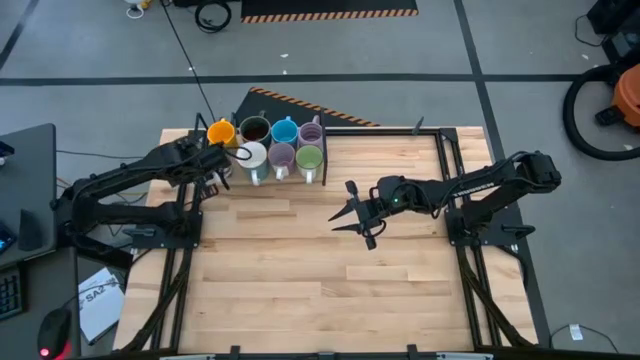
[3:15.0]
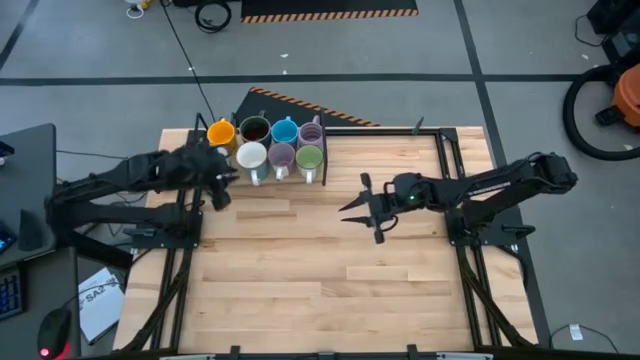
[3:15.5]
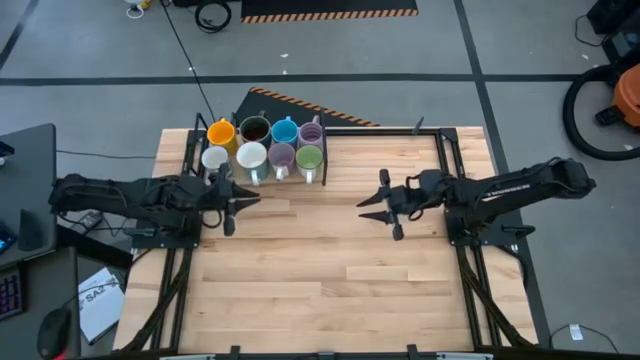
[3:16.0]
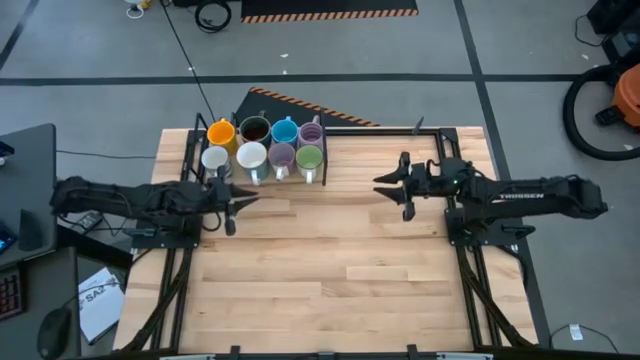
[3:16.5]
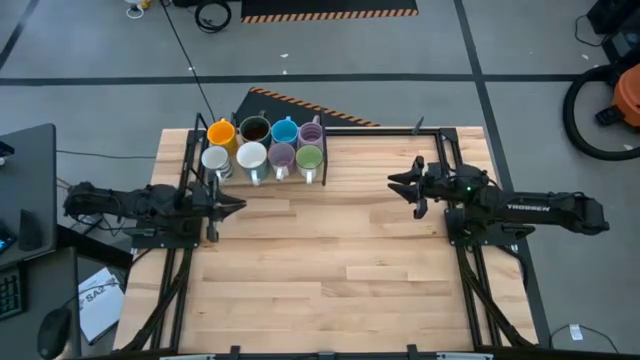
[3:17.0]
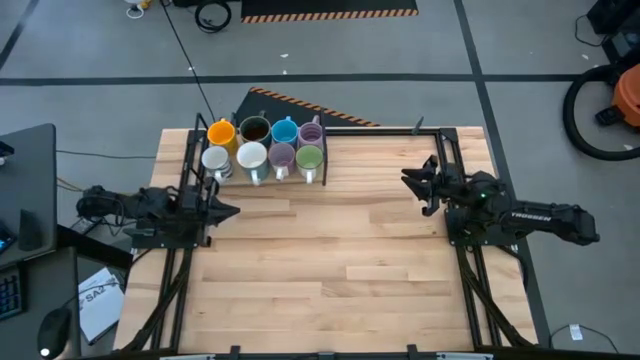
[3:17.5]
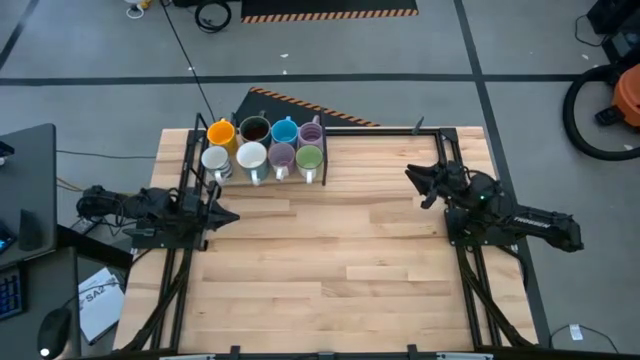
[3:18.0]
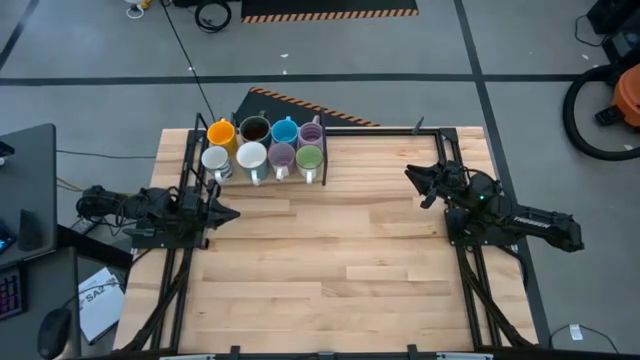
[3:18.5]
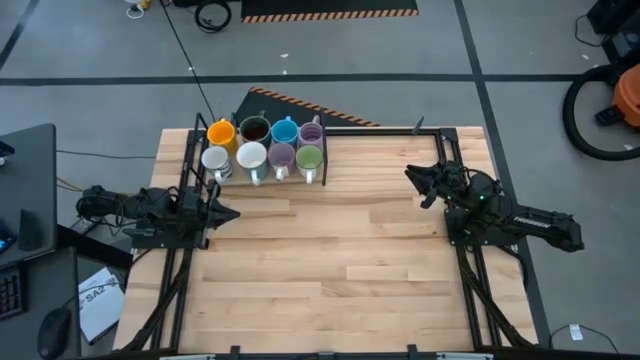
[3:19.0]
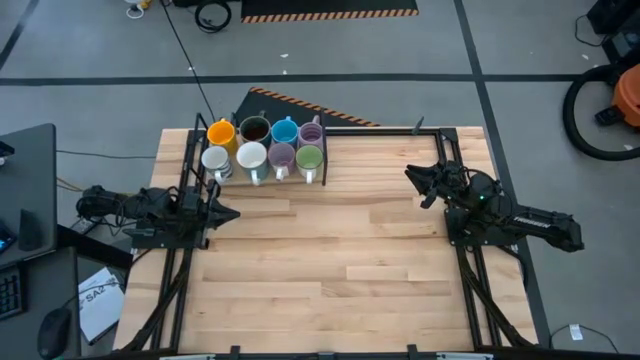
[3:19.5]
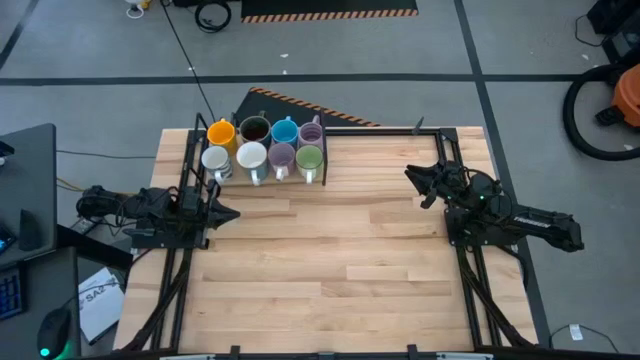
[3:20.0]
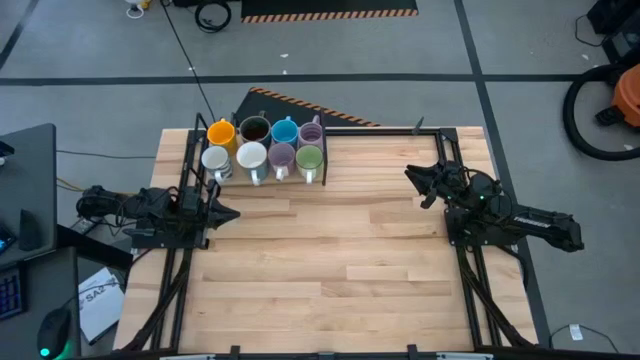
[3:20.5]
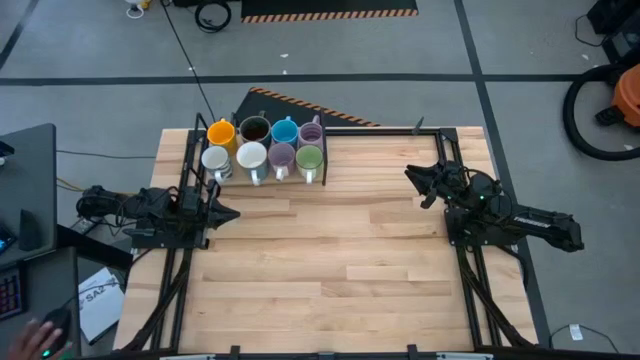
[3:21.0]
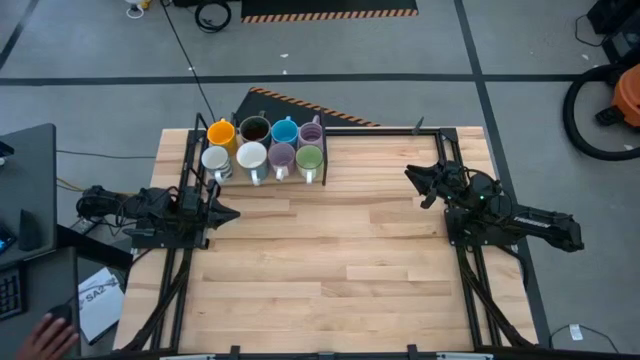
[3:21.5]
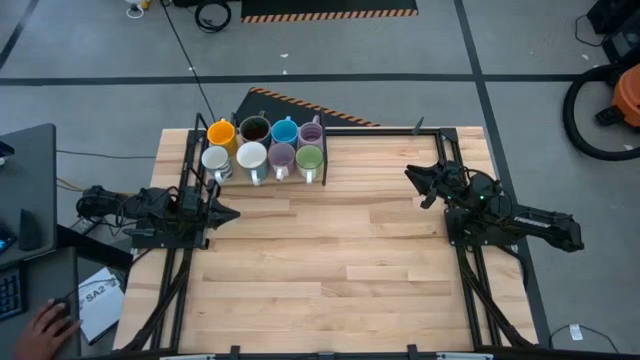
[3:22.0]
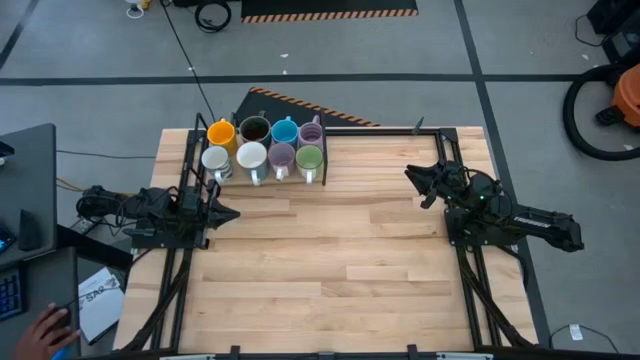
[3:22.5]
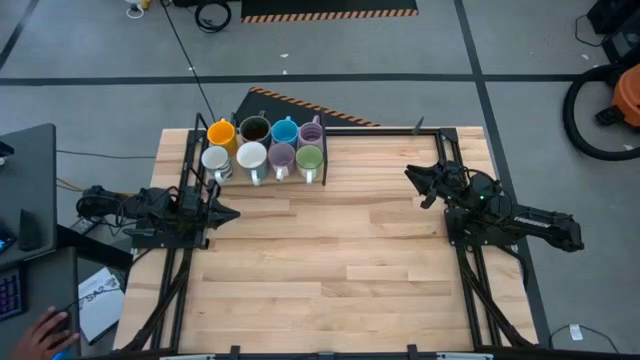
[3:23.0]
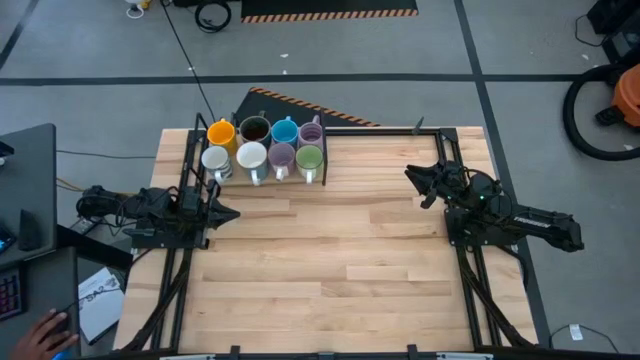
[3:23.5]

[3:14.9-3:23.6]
Task: Place coffee mugs
Return to Home Position

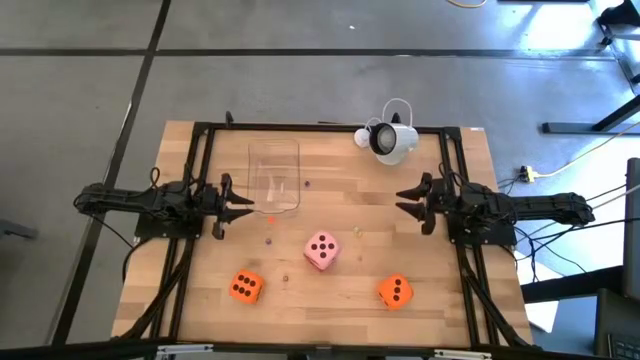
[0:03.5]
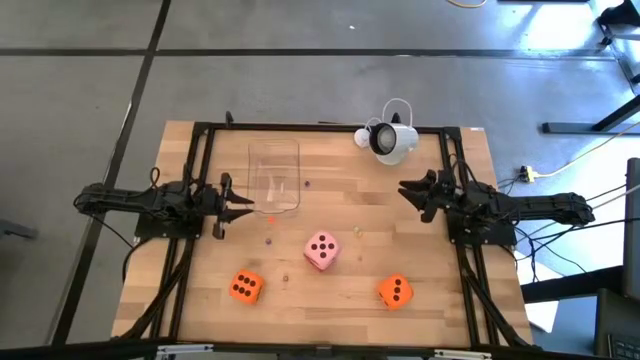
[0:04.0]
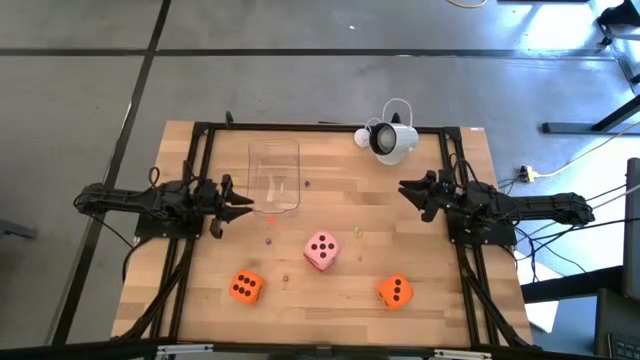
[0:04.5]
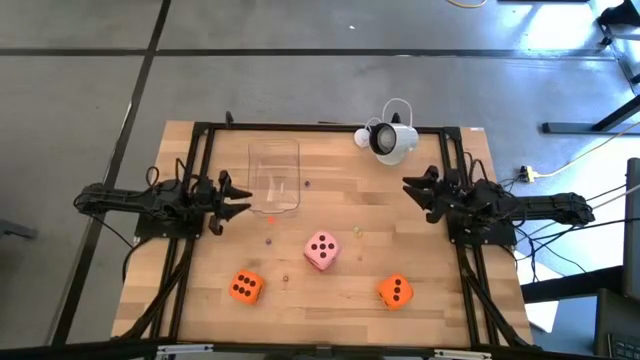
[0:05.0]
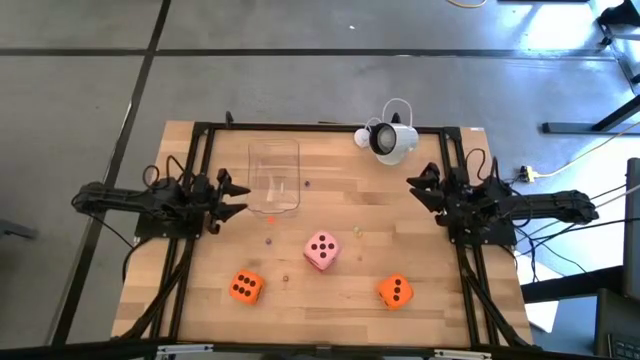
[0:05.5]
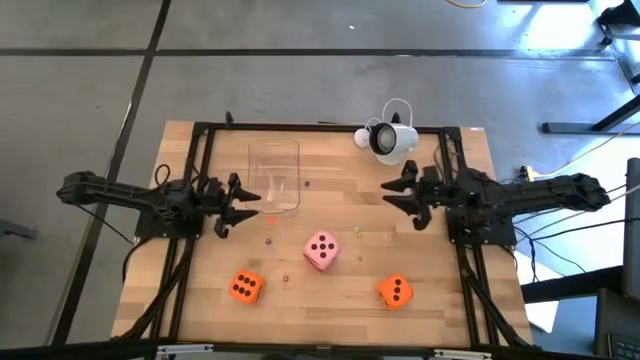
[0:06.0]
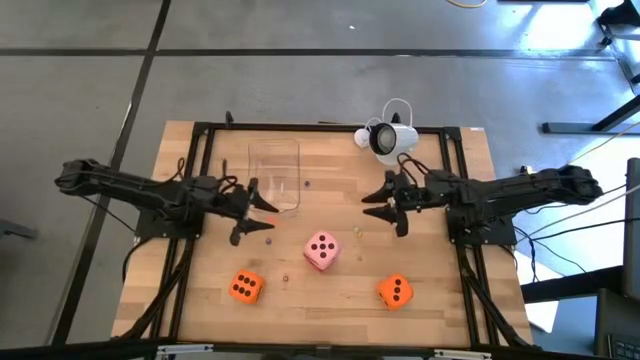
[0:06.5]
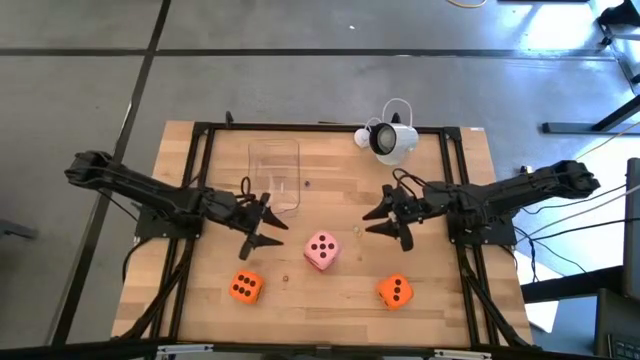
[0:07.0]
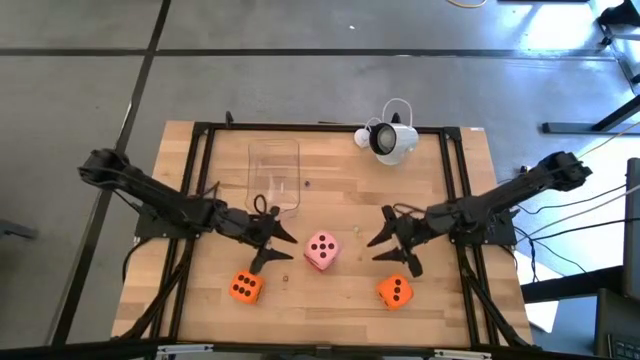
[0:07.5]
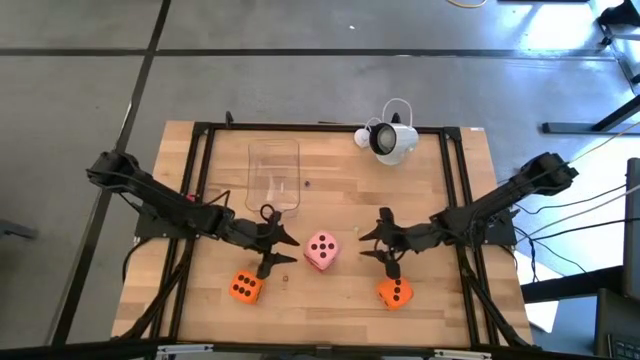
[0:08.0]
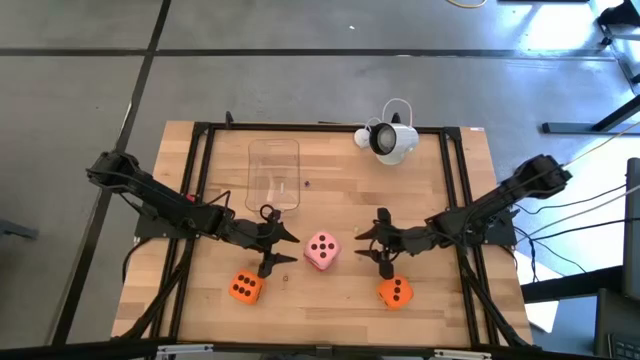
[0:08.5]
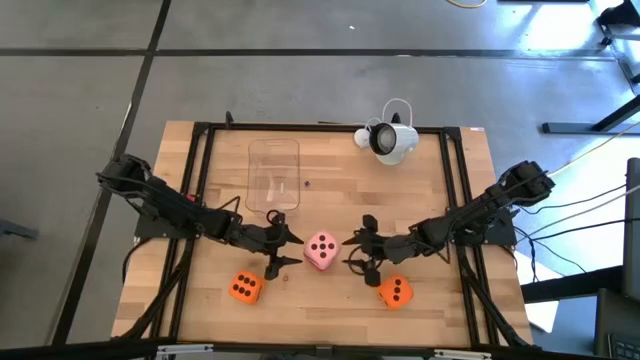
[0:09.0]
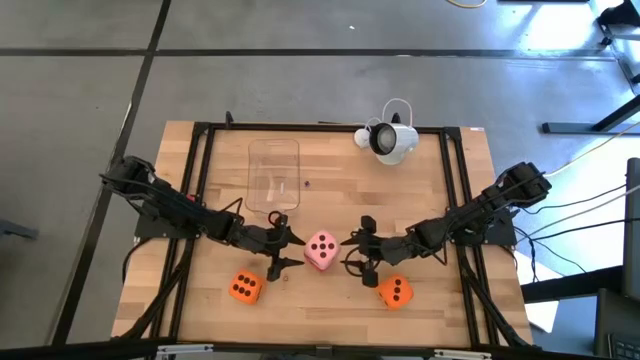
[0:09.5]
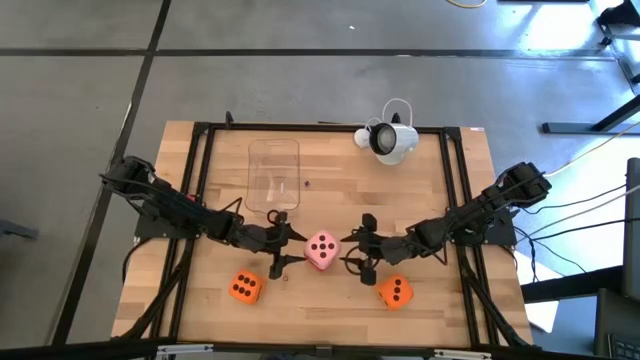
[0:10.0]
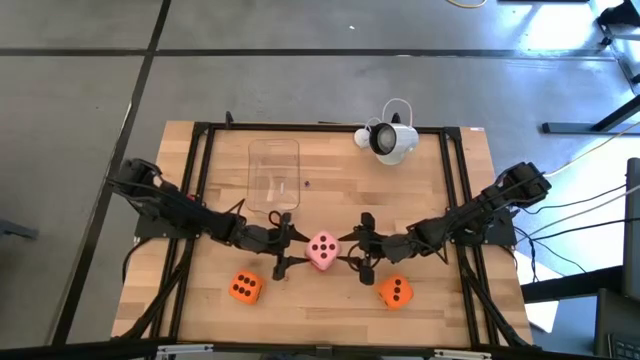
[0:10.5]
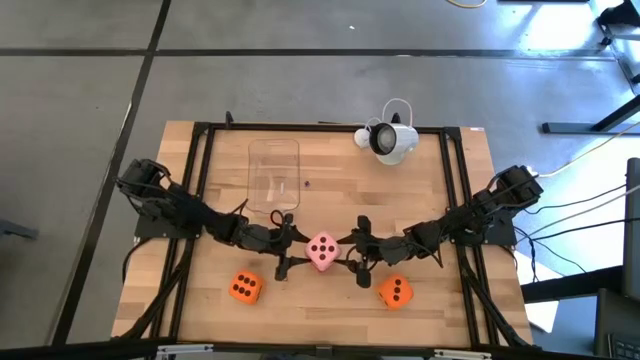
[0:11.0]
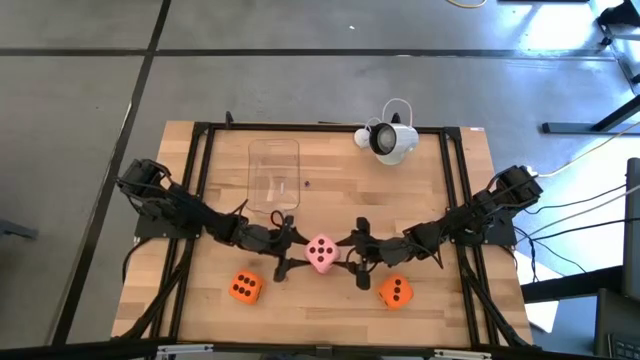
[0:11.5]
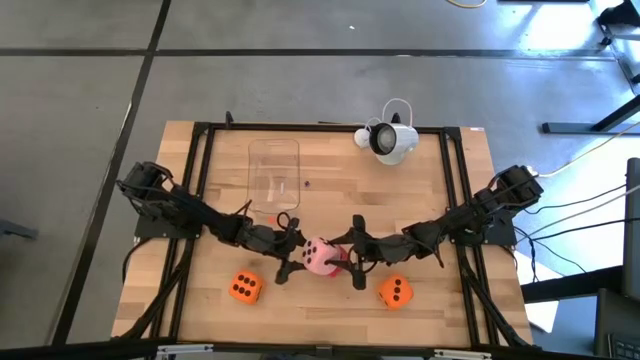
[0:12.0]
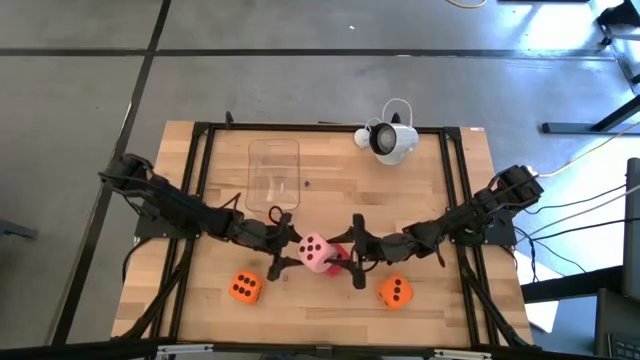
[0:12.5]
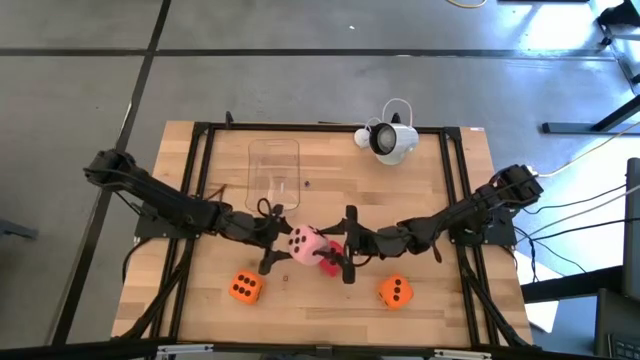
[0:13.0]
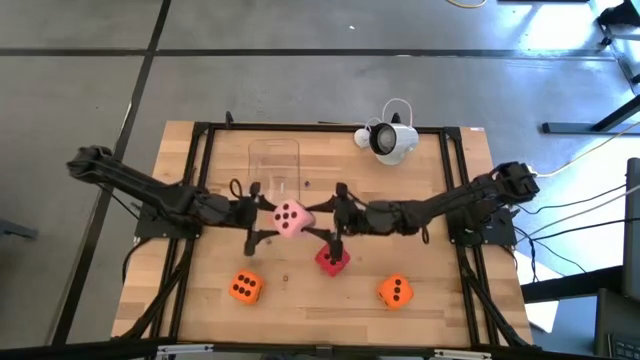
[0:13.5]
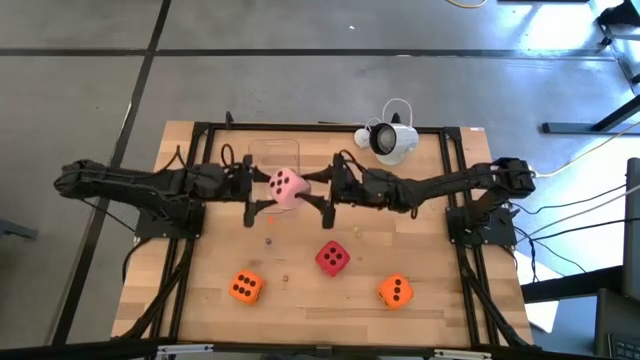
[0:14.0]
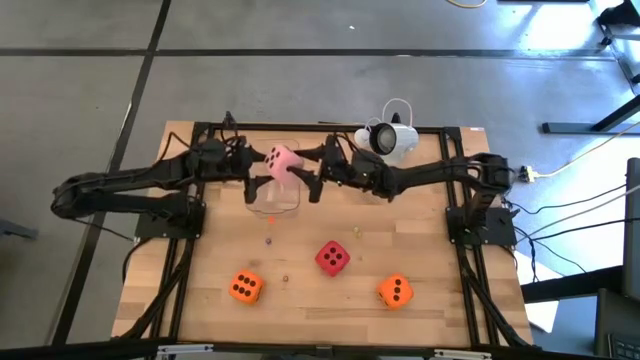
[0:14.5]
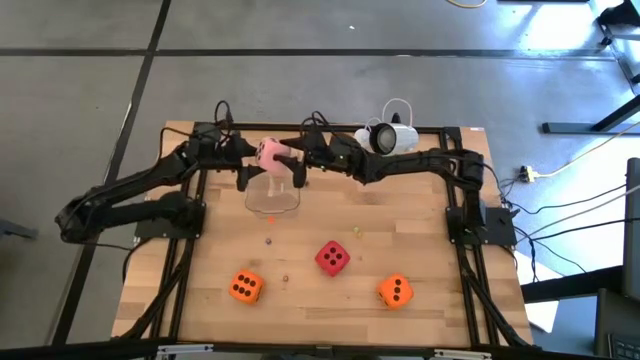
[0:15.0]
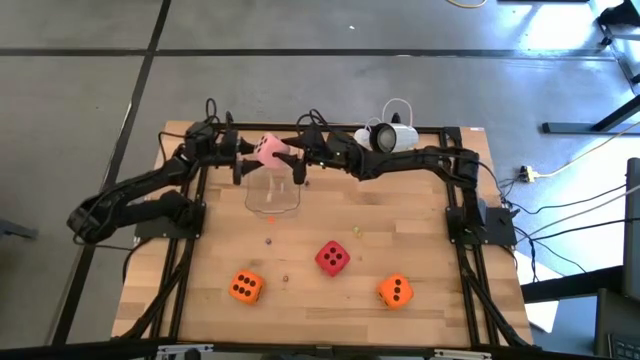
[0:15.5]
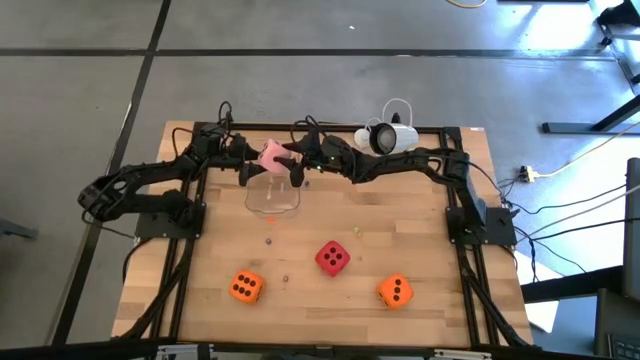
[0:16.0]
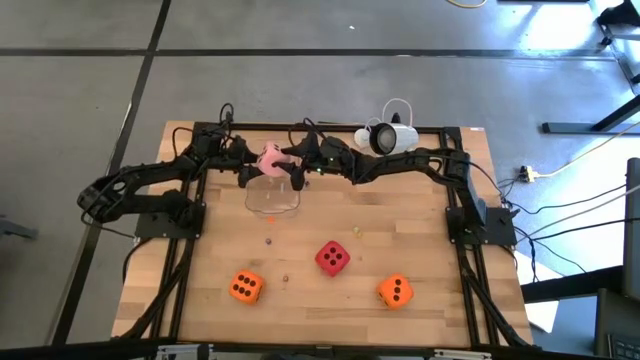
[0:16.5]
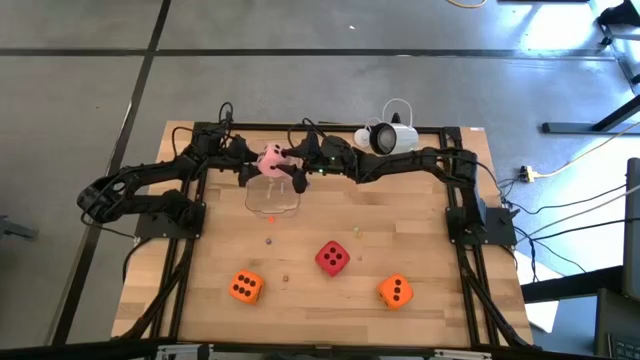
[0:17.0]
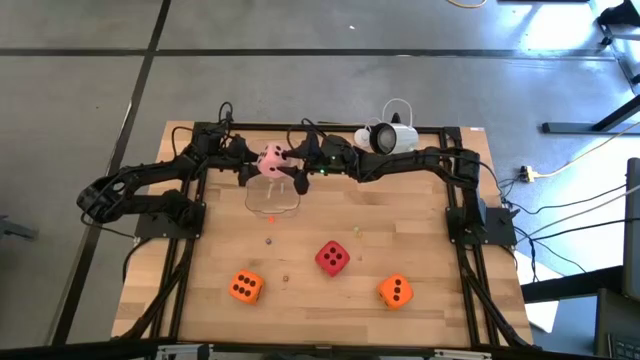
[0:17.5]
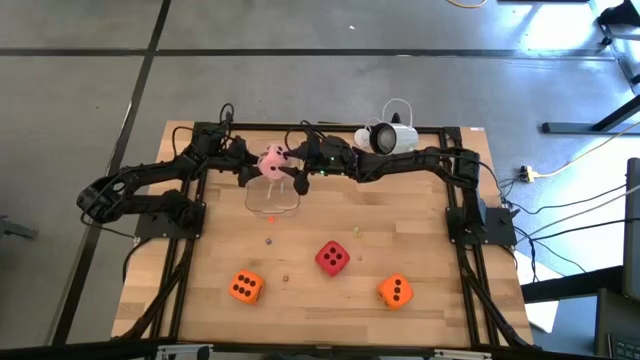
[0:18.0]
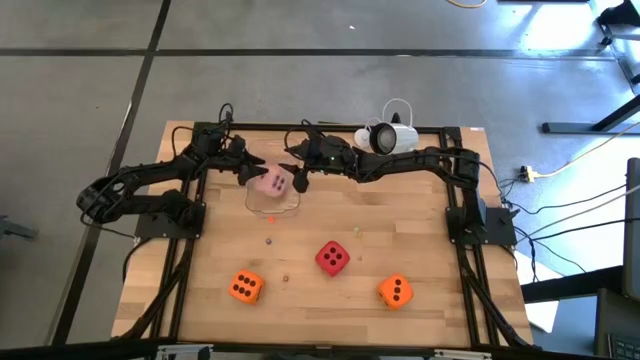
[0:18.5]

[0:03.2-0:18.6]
Task: Pick & Place Dice
Put the large pink die into the transparent bin
